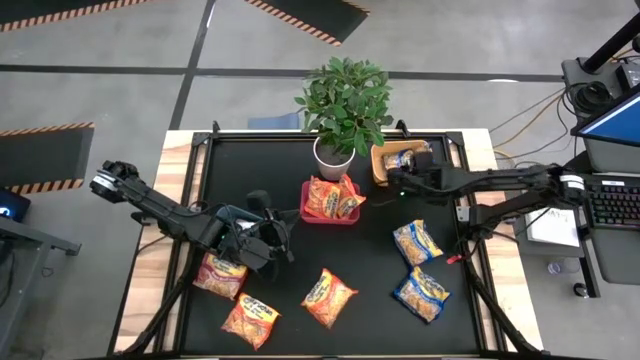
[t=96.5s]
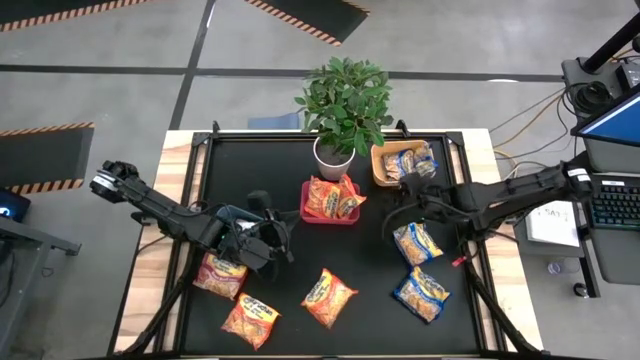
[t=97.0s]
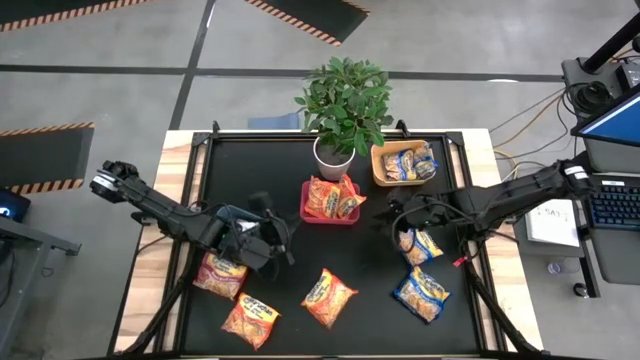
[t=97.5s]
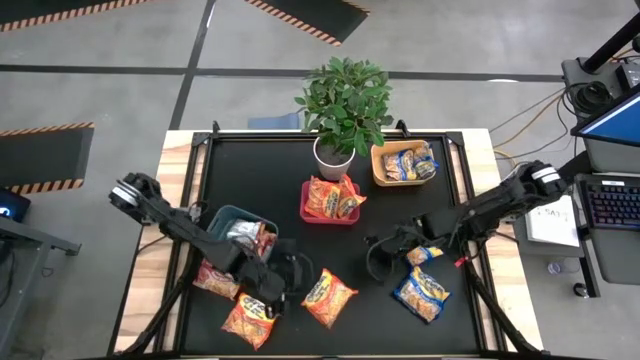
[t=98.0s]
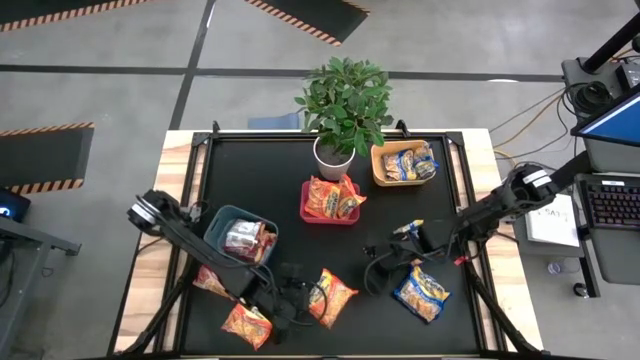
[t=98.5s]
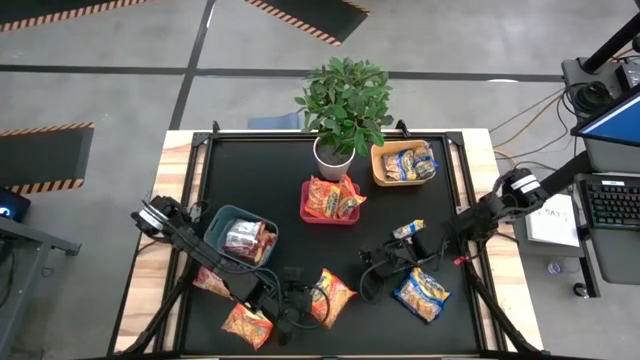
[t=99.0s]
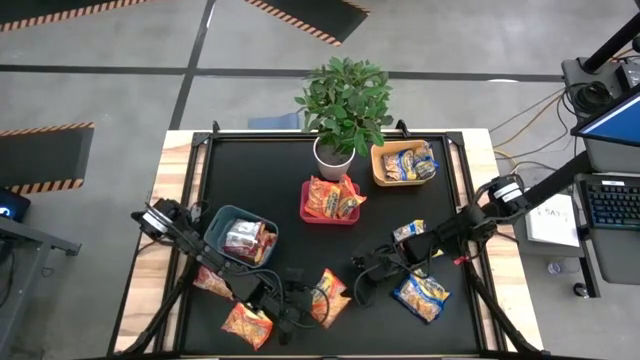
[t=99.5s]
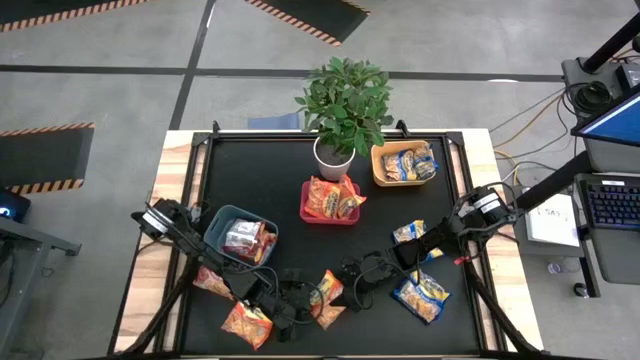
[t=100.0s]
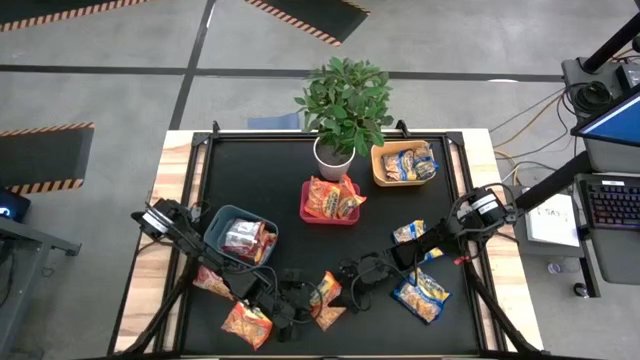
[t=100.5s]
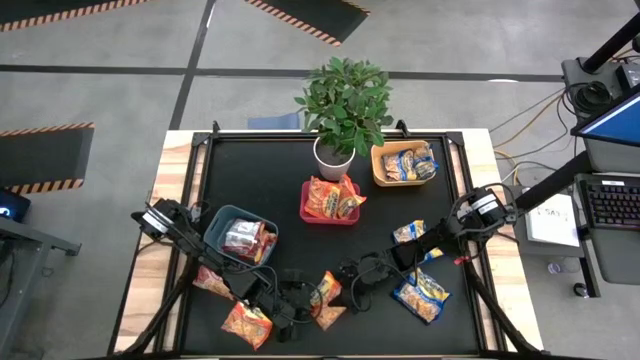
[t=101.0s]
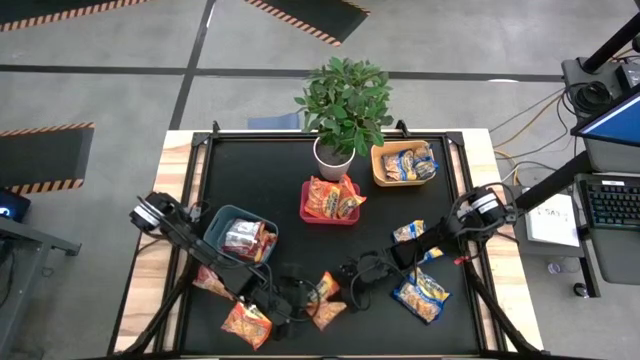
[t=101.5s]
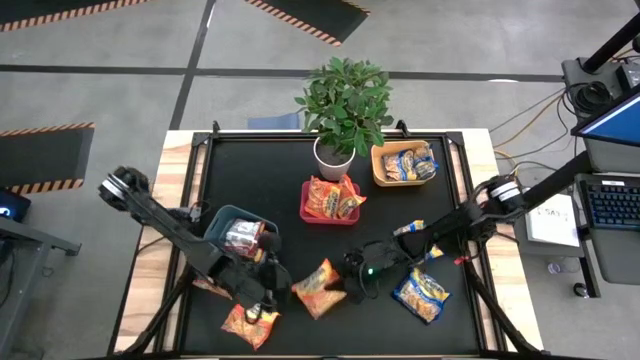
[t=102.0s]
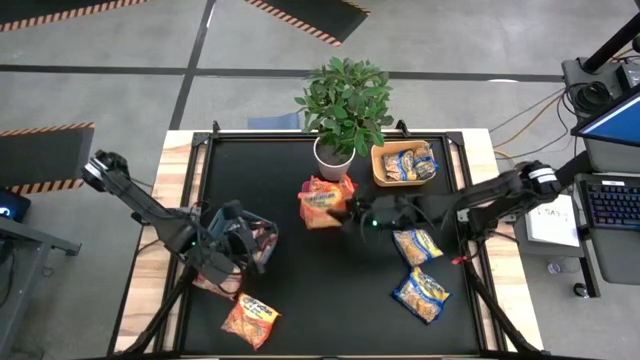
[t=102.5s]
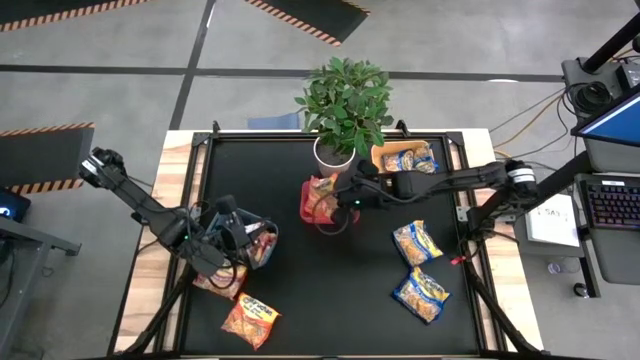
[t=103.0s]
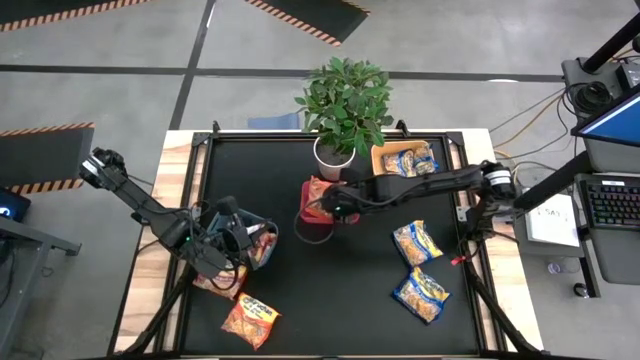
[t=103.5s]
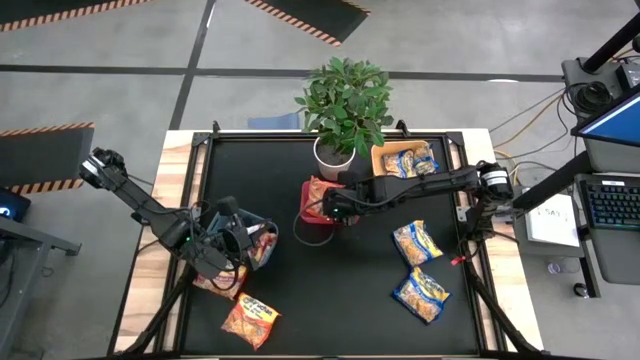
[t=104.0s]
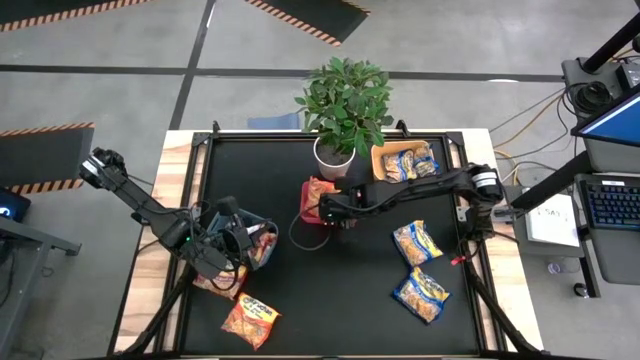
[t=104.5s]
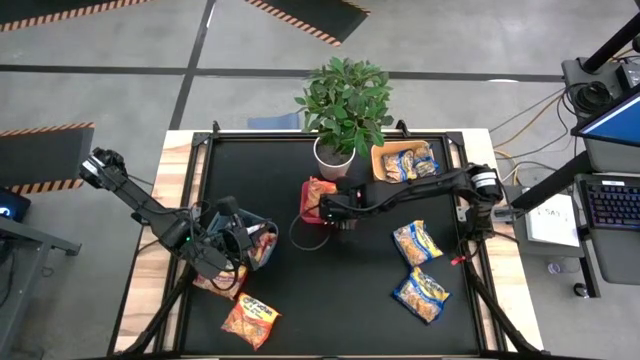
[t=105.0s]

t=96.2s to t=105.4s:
Task: Sort Maruchan noodles
Put the right orange noodle pack into the red bin

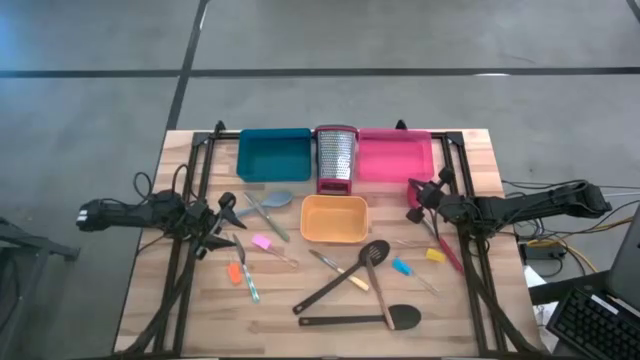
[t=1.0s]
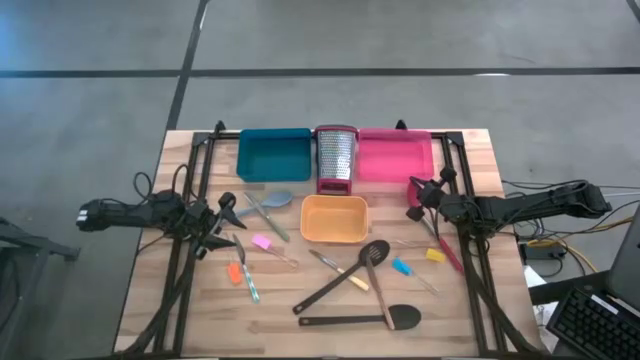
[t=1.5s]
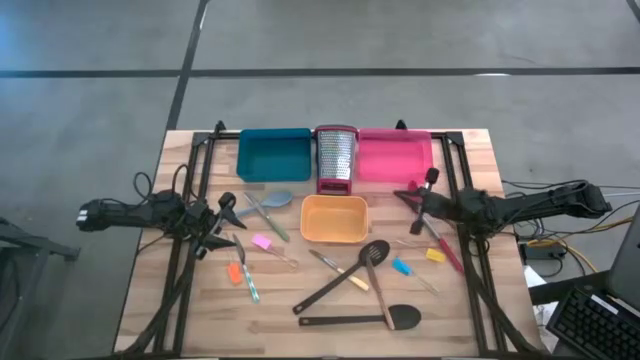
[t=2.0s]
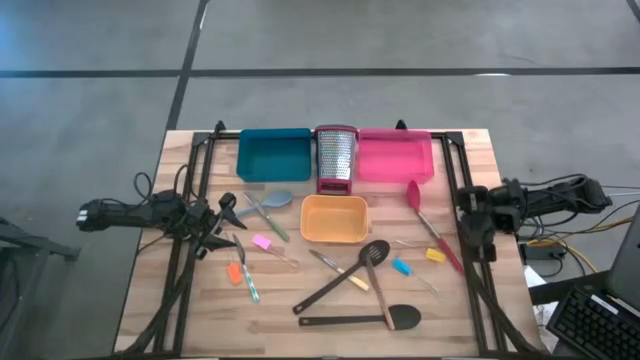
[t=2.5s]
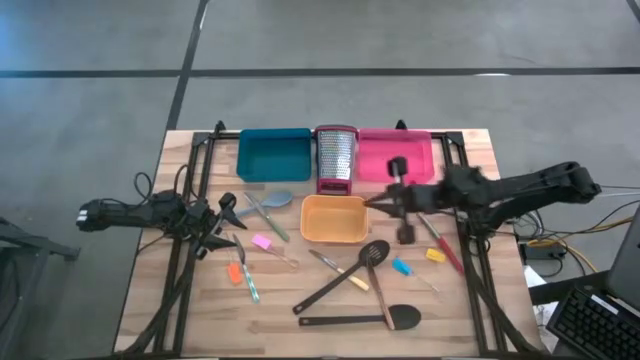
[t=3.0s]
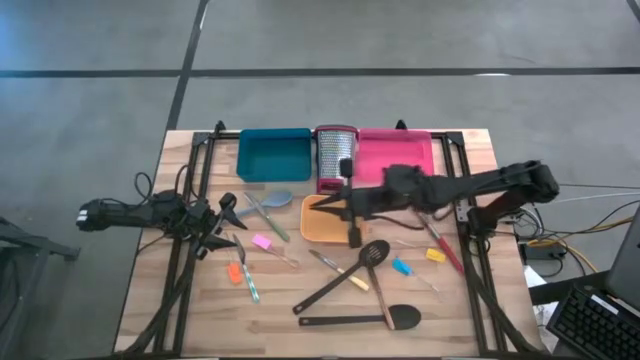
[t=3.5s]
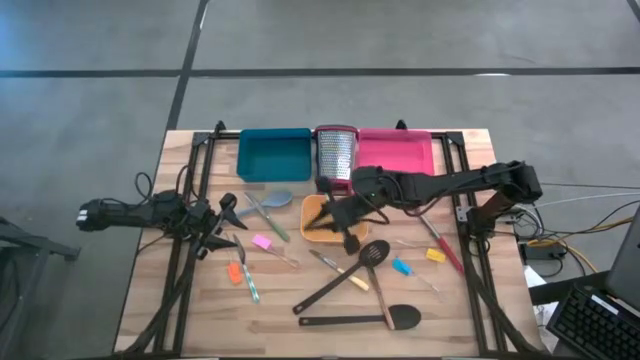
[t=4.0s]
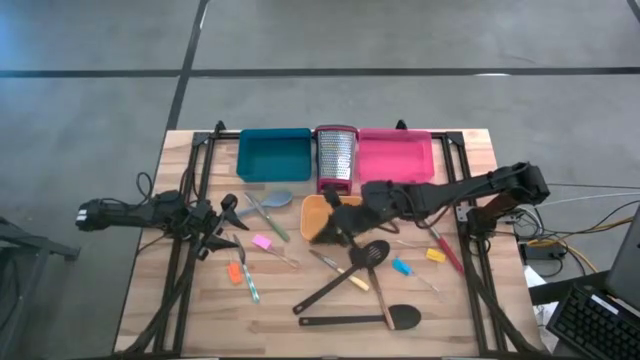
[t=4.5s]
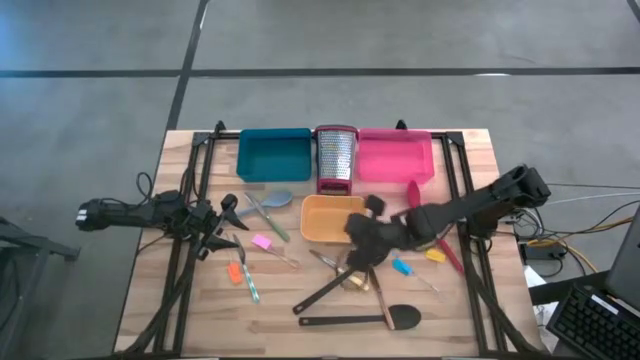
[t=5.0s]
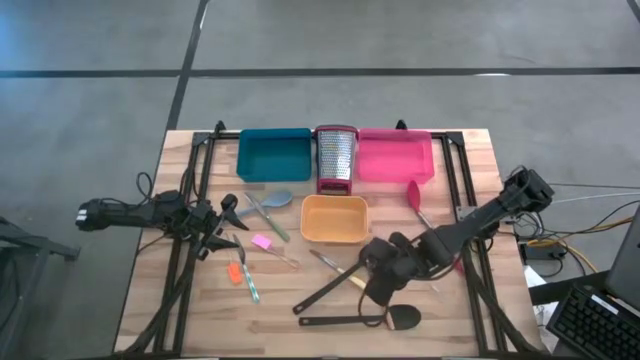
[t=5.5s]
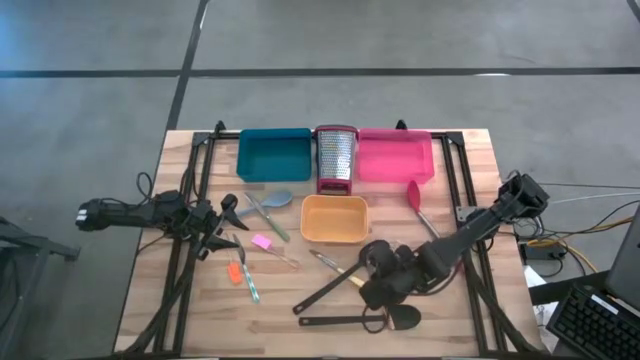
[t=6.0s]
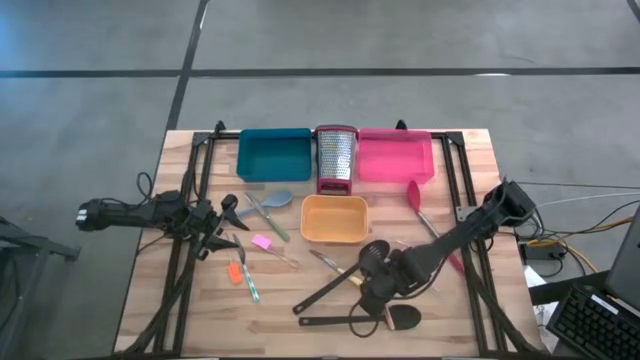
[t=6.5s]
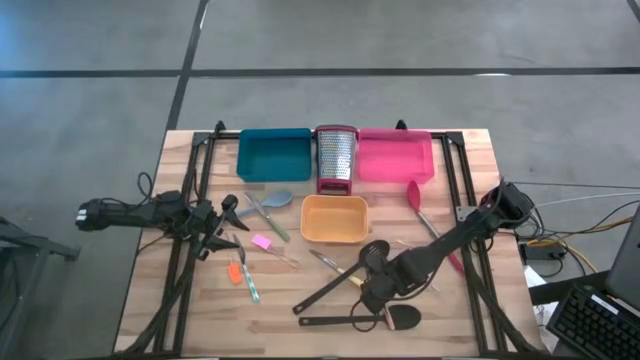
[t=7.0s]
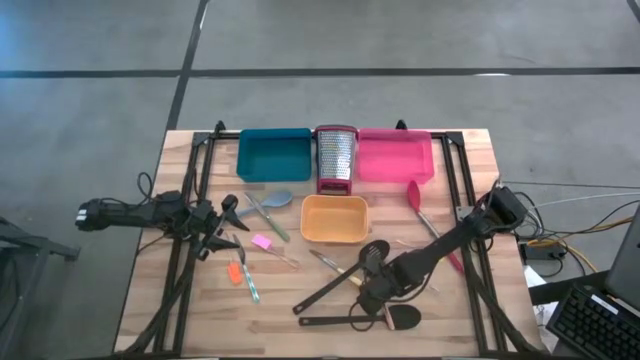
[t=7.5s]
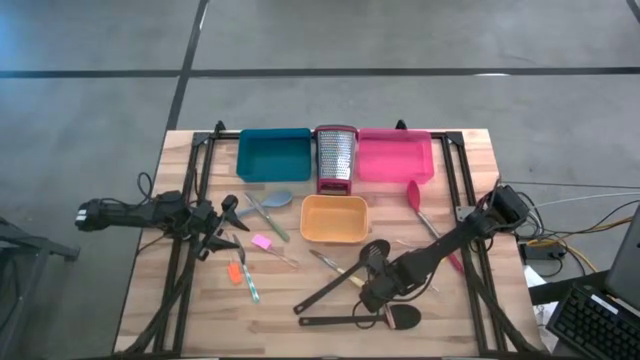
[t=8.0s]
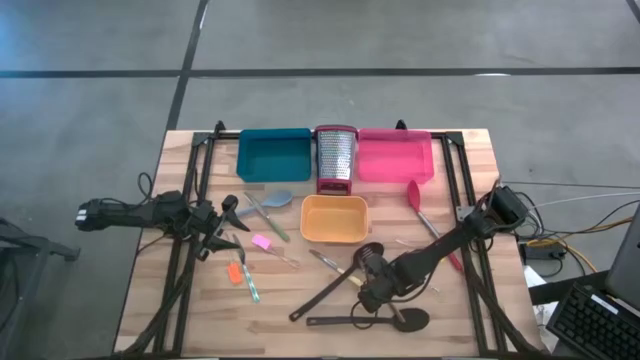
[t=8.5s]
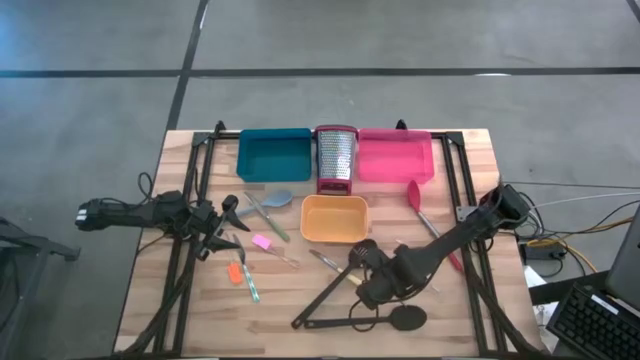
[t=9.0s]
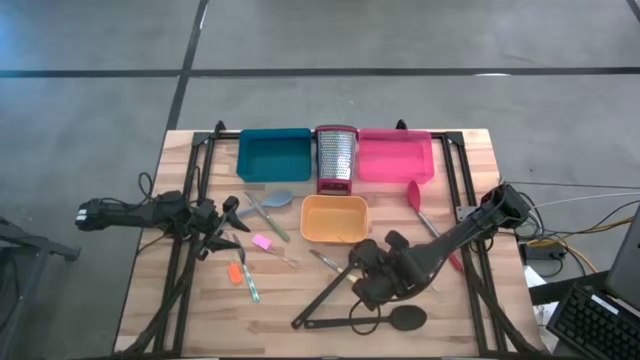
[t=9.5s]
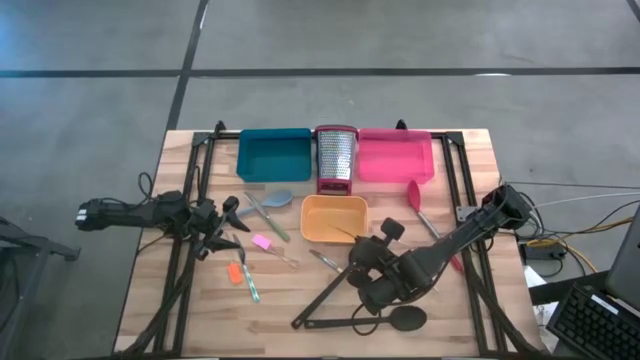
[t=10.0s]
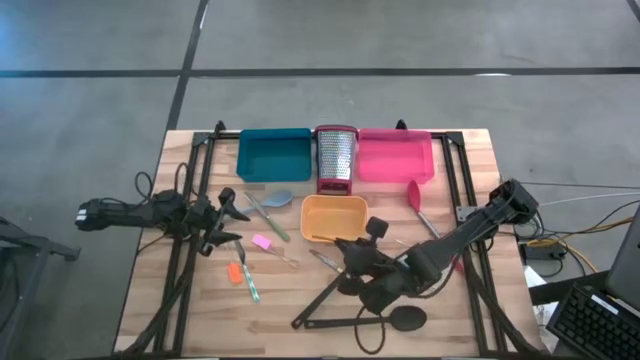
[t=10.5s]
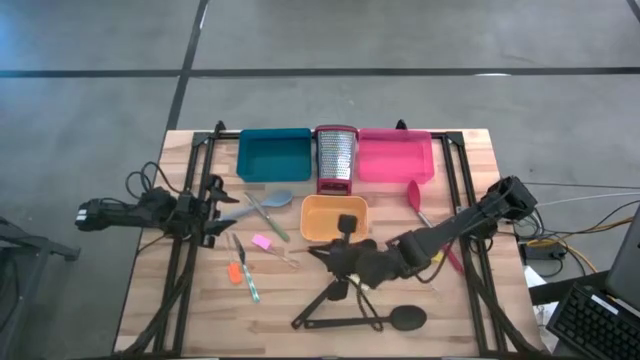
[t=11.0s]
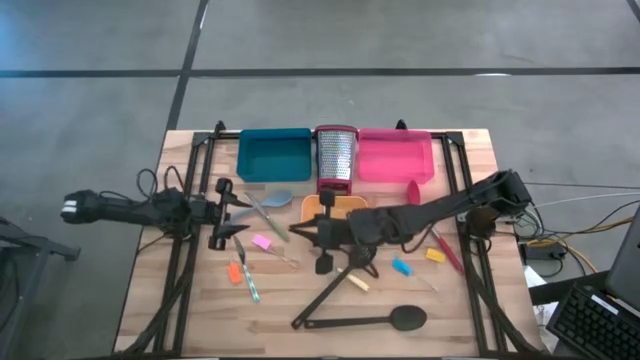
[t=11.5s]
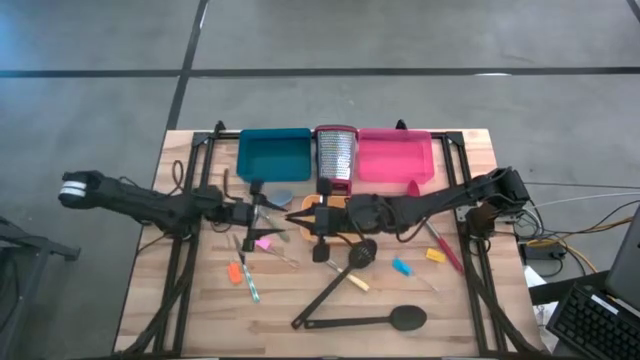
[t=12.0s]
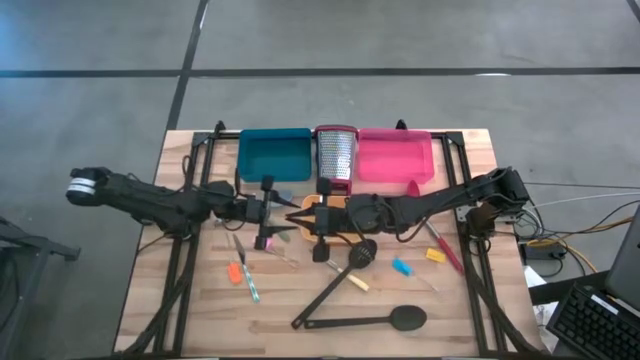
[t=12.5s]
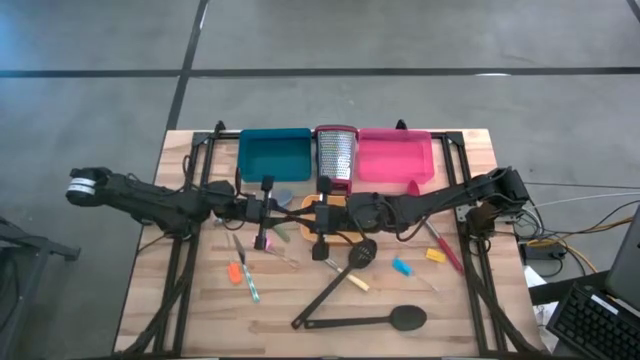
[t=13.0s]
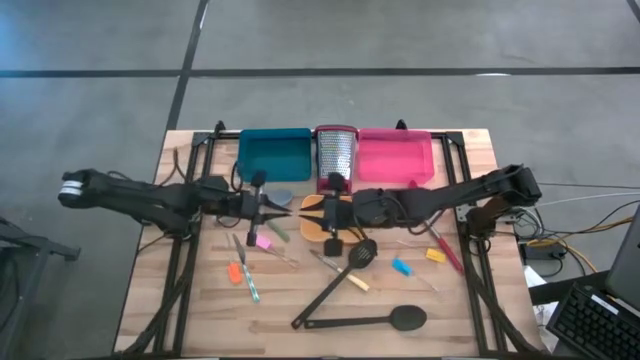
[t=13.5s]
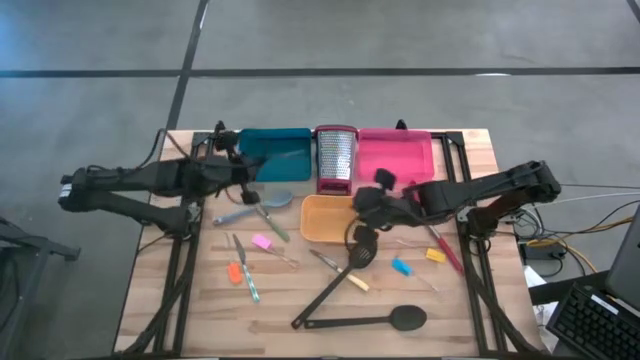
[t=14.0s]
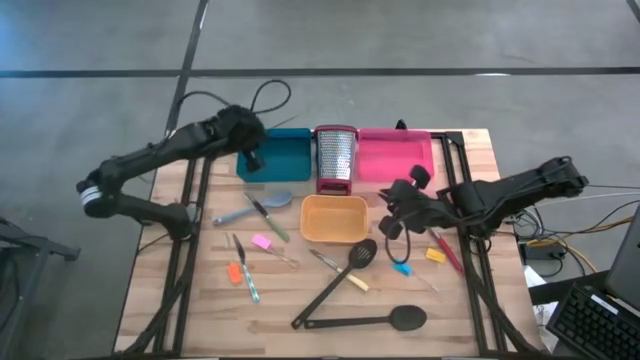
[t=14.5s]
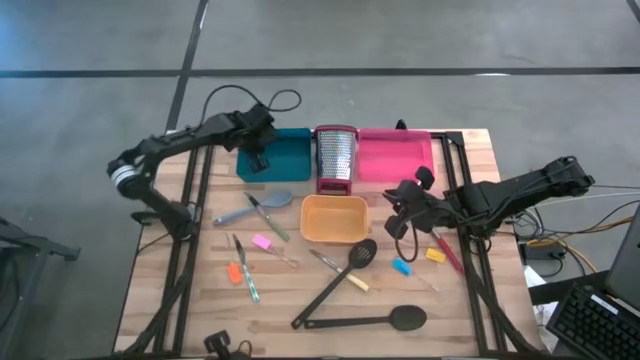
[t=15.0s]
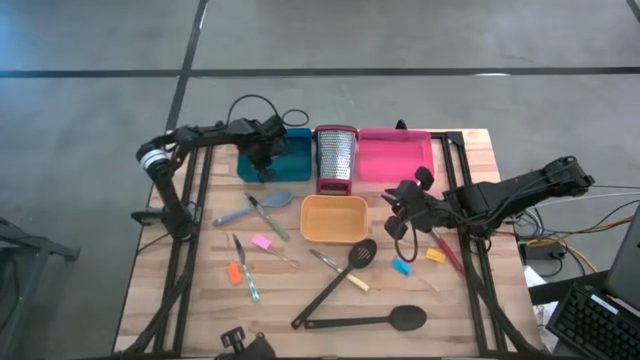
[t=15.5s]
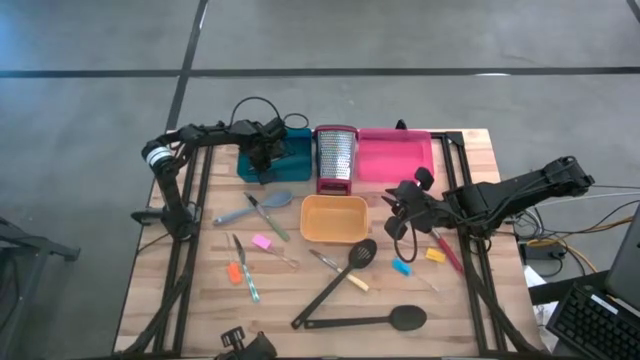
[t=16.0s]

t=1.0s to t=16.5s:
Task: Pick & Place Kitchen Items
Put the bronze table knife into the blue bin
